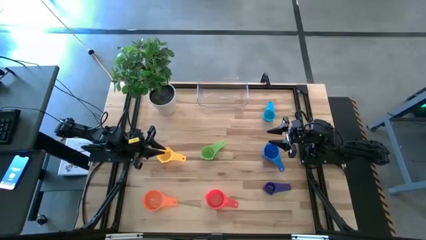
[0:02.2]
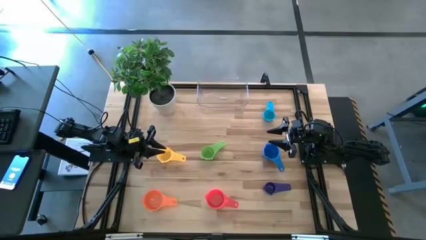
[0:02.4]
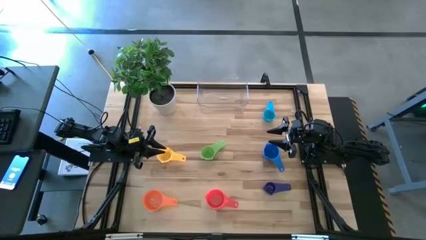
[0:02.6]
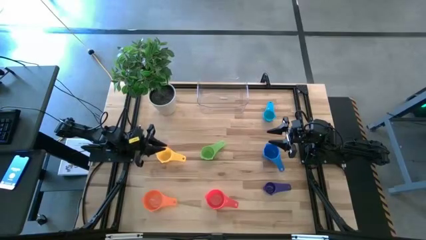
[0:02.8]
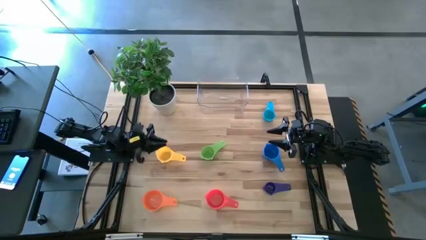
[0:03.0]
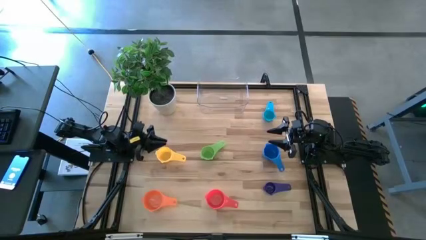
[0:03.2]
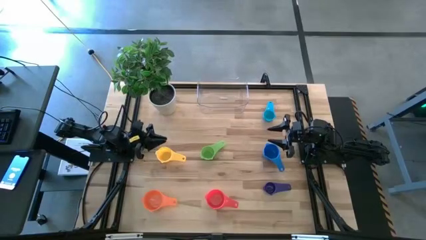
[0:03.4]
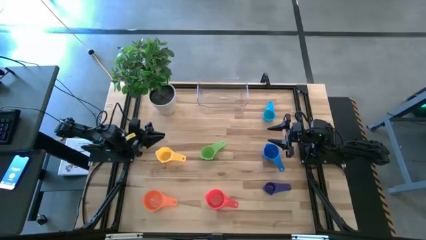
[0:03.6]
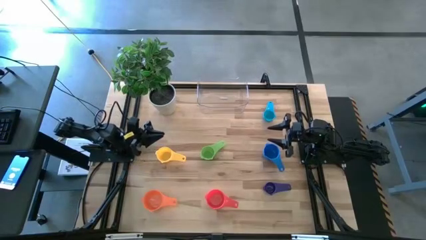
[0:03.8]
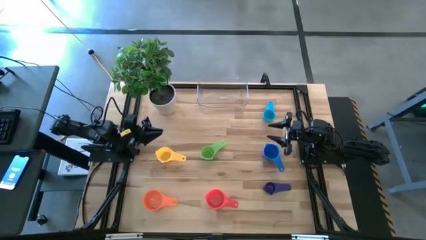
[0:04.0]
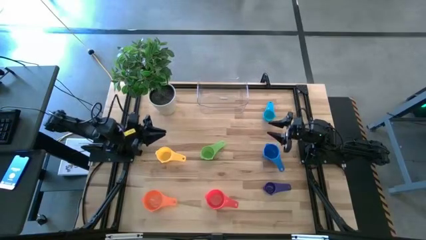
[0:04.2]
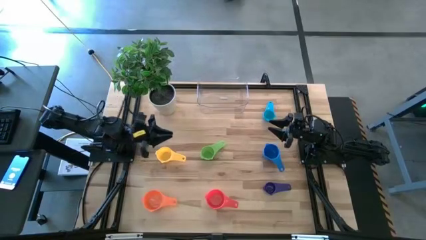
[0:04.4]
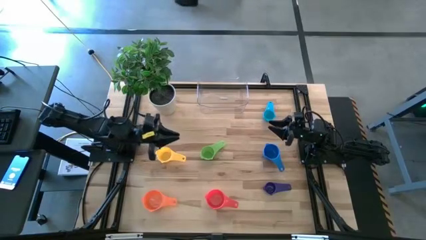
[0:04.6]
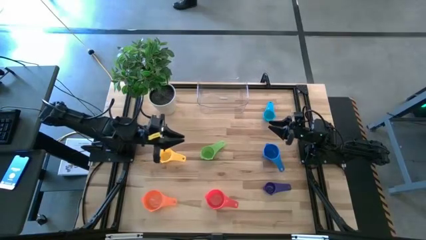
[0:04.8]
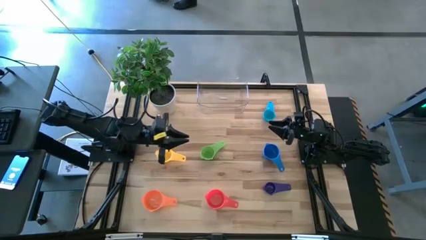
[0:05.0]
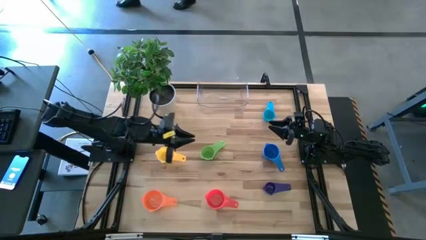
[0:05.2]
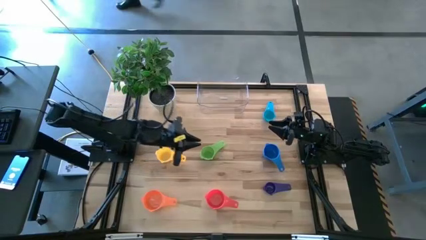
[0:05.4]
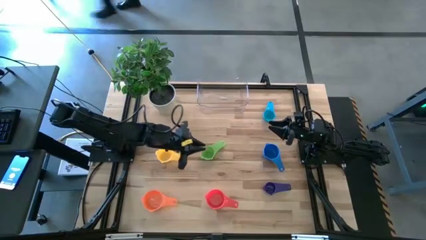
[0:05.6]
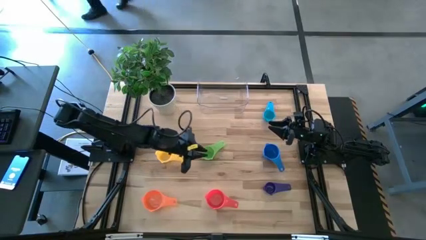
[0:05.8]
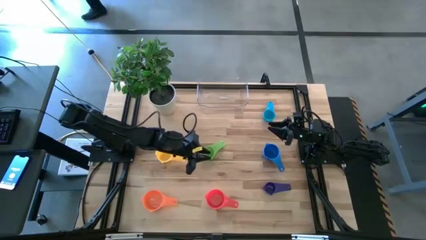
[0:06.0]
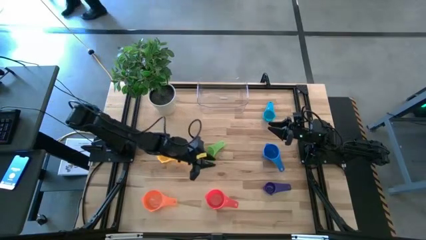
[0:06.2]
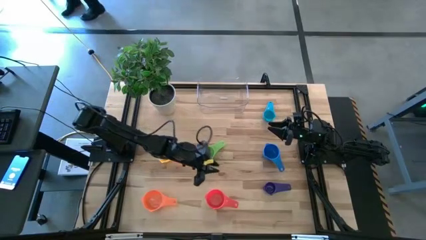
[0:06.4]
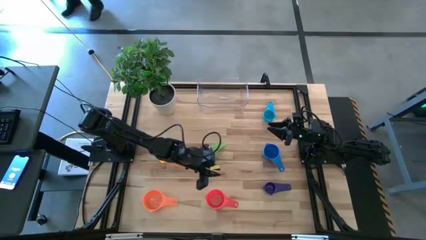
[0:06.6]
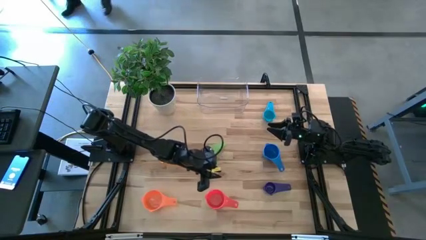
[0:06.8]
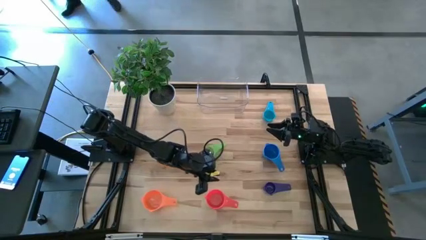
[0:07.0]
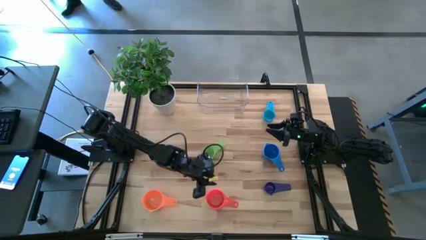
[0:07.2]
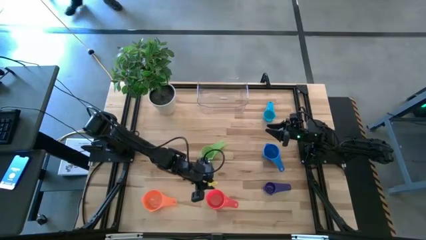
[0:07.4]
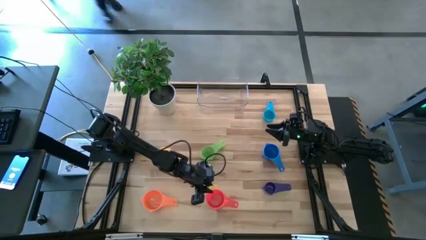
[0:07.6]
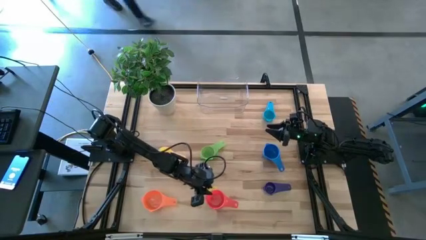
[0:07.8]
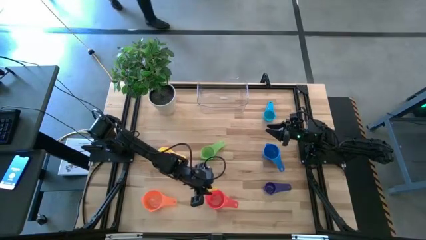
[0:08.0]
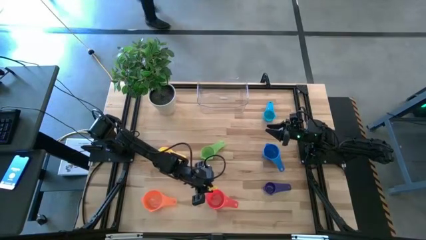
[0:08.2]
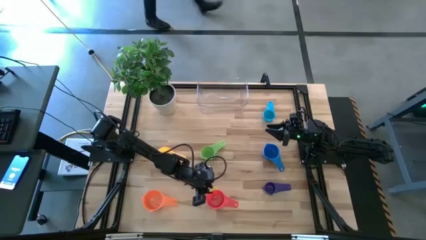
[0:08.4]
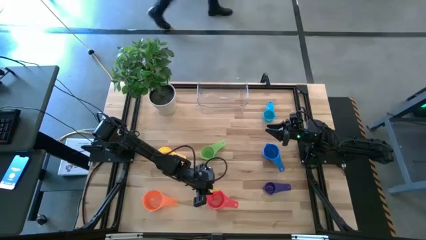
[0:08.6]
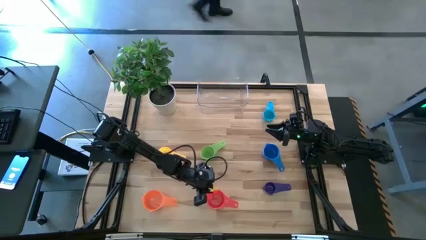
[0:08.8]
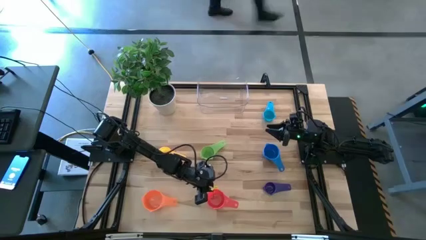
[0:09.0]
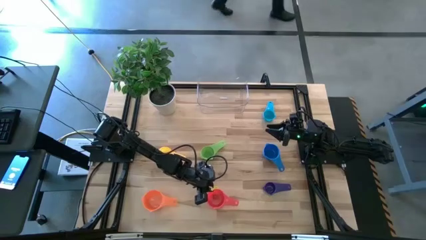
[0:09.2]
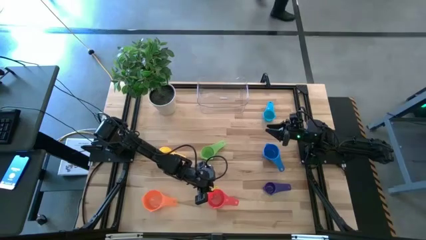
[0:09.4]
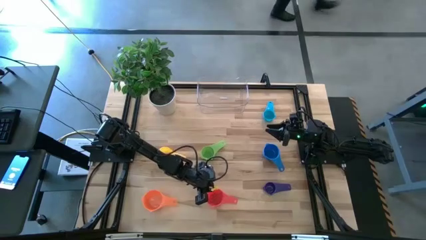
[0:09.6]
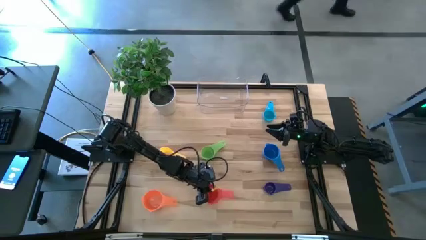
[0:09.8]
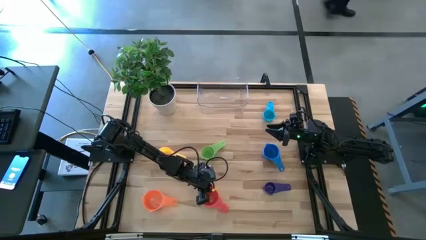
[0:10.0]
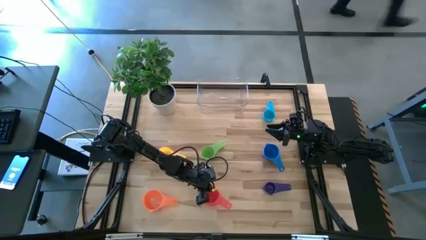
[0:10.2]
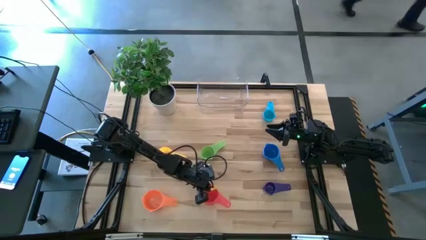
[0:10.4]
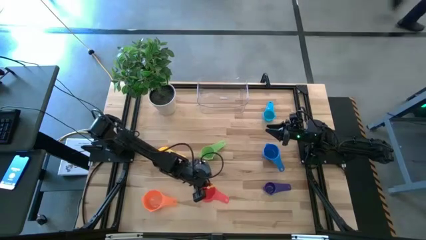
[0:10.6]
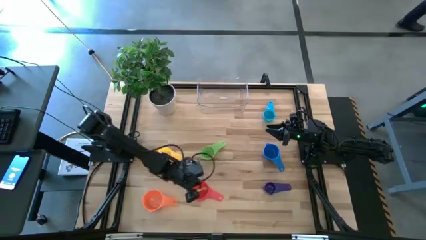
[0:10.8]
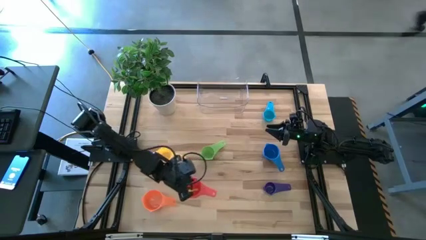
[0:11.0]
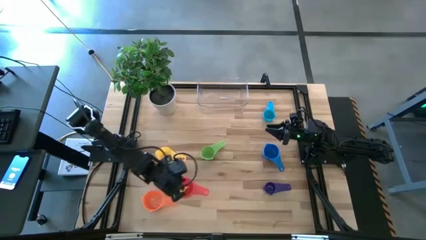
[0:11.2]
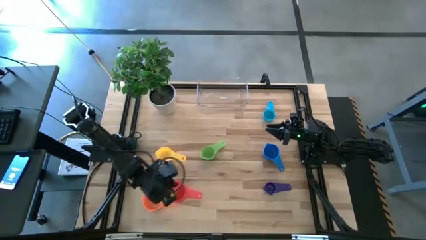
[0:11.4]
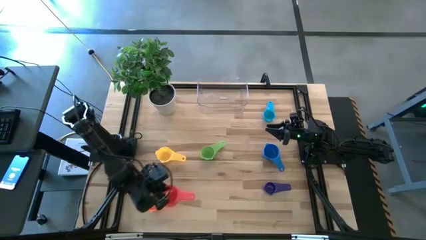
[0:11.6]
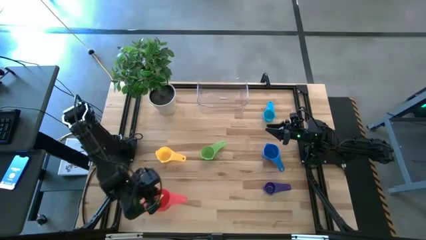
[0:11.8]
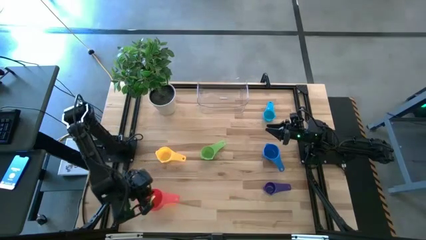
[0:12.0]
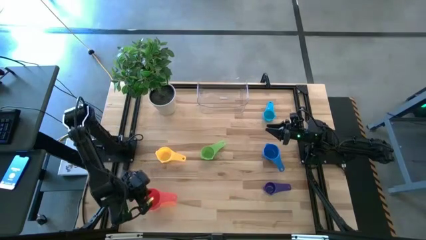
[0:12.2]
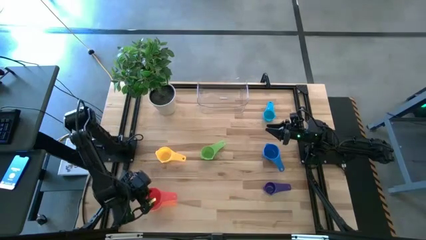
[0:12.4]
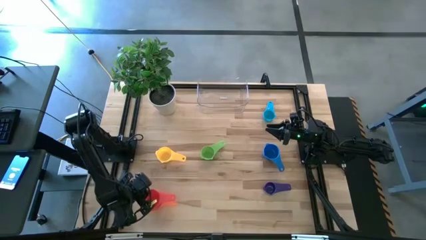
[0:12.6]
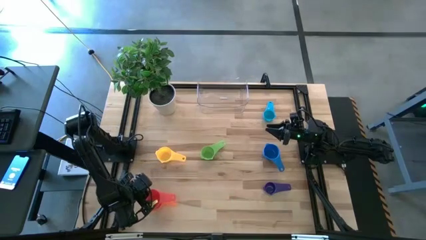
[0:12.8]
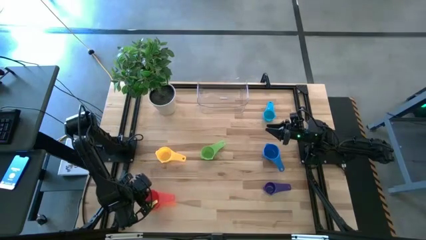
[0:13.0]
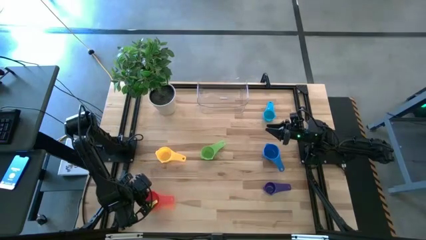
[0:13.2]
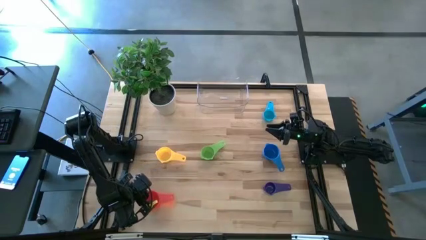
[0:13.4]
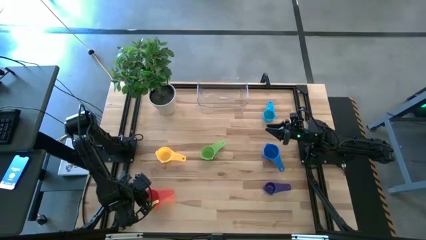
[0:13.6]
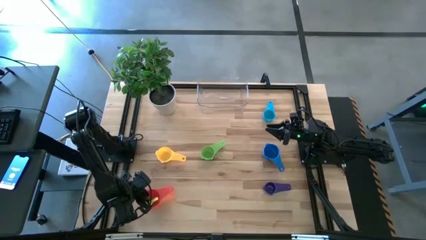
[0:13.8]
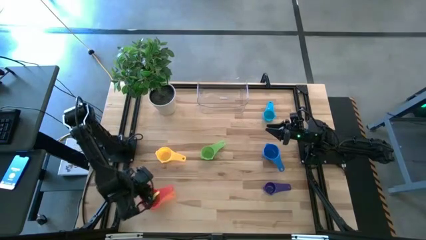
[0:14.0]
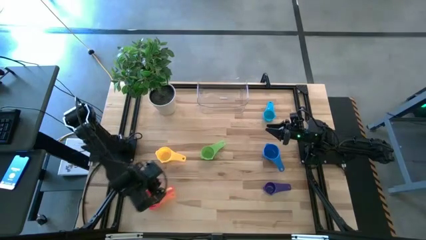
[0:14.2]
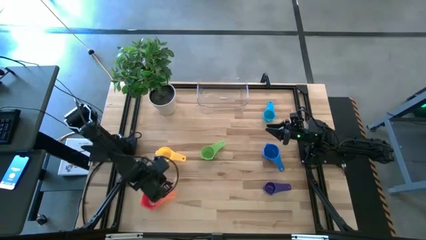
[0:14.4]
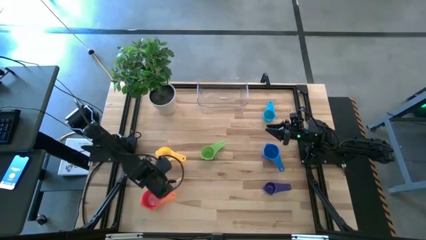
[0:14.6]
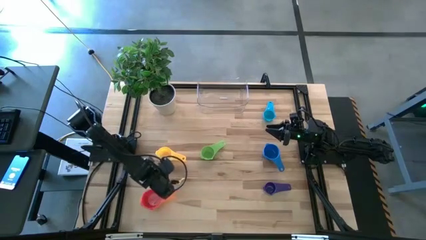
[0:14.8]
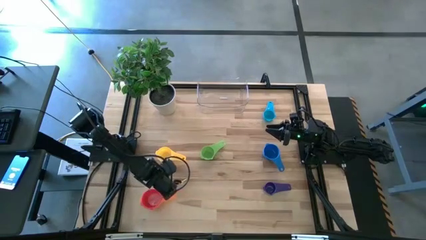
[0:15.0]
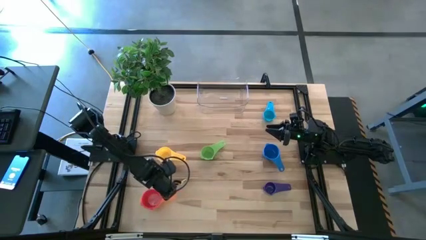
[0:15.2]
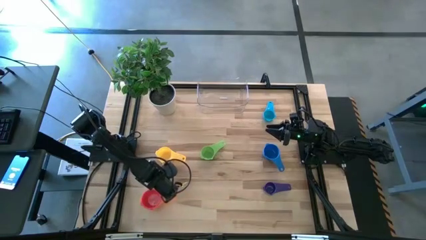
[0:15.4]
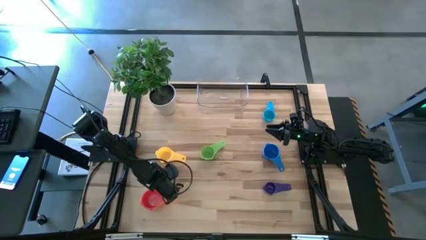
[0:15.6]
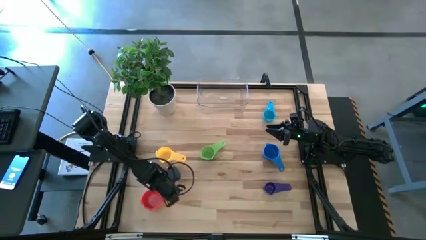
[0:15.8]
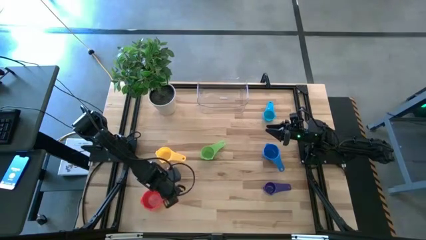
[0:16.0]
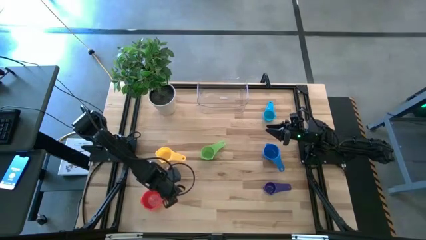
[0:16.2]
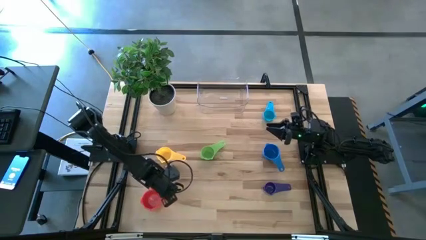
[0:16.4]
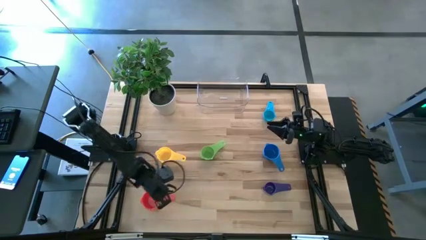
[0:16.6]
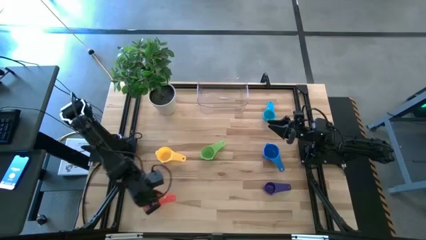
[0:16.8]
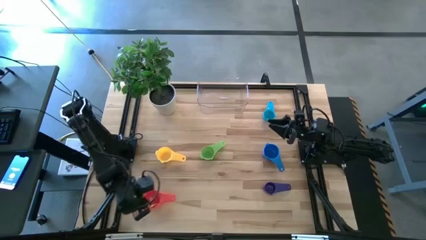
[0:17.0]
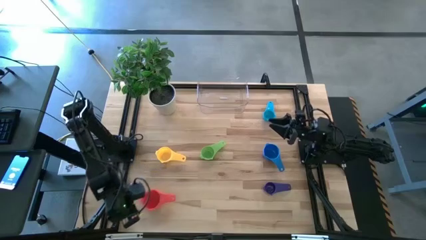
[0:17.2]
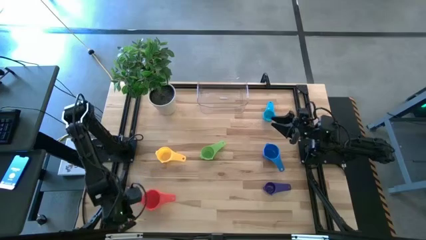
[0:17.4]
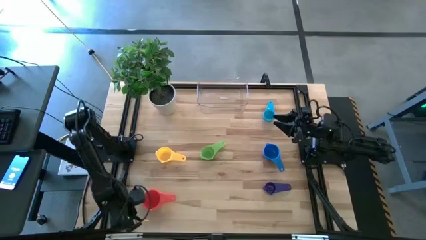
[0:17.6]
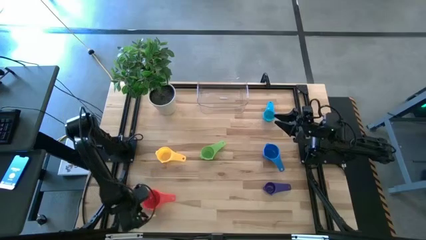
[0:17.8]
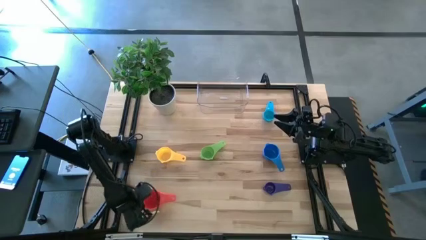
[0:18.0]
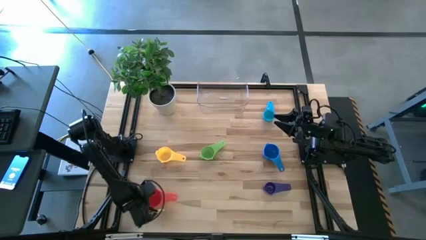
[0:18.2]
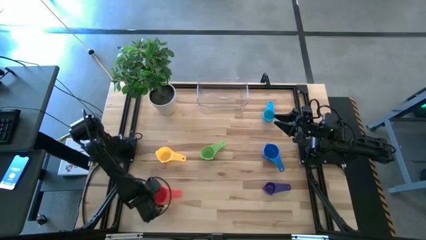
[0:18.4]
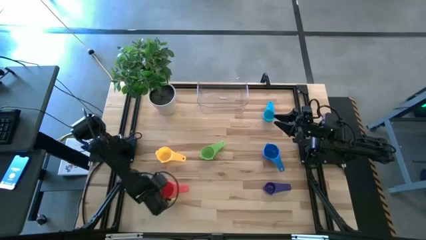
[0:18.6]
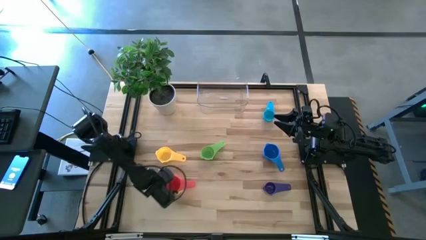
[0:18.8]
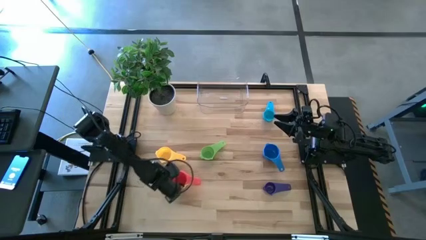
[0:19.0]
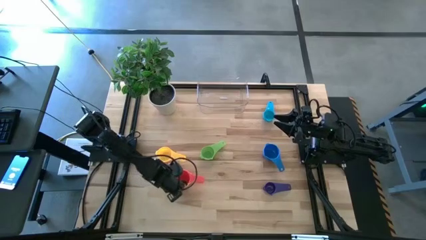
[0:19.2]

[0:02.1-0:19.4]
Task: Nest measuring cups in basket
Stack the red measuring cup on top of the orange measuring cup
